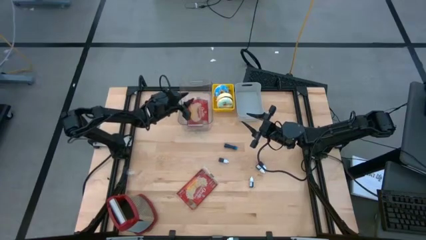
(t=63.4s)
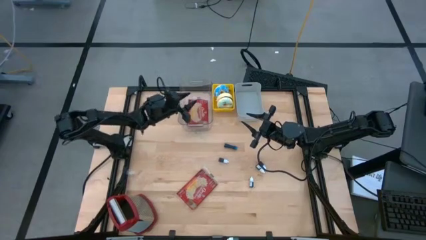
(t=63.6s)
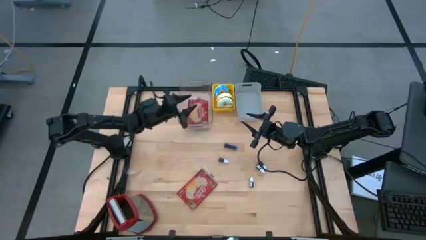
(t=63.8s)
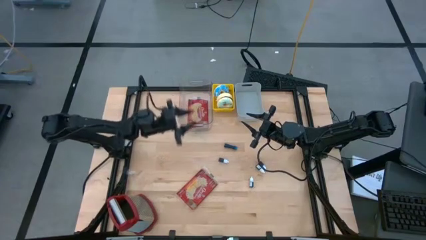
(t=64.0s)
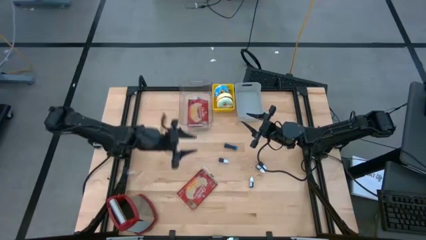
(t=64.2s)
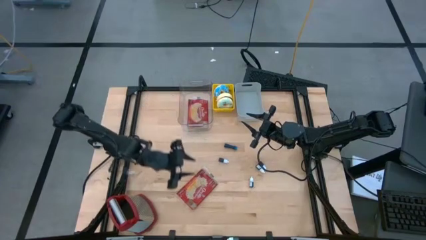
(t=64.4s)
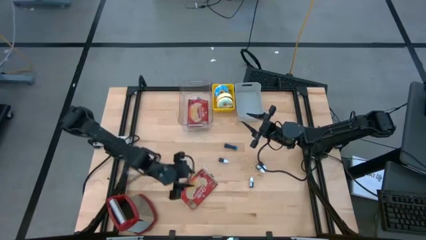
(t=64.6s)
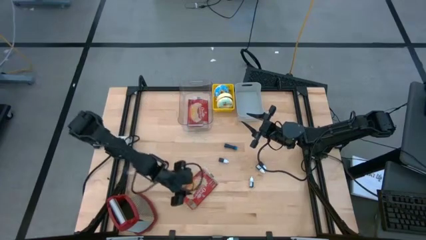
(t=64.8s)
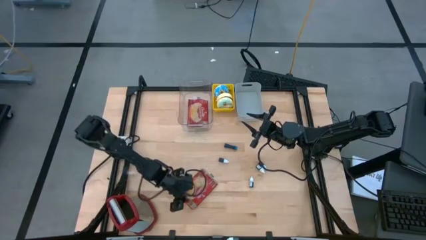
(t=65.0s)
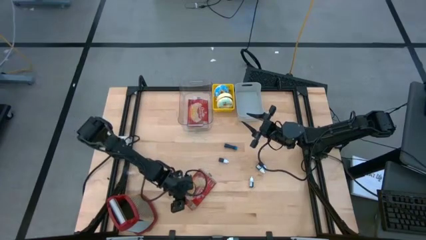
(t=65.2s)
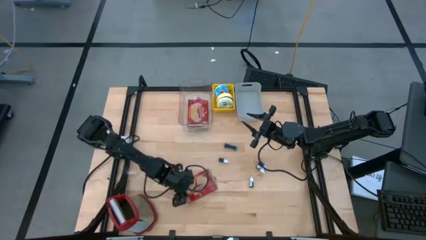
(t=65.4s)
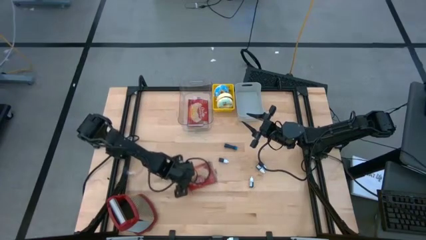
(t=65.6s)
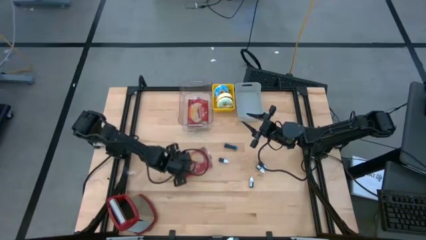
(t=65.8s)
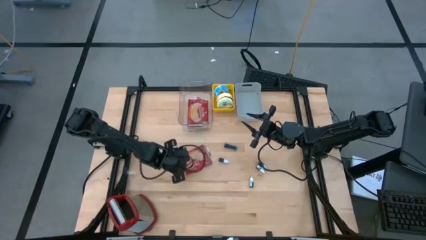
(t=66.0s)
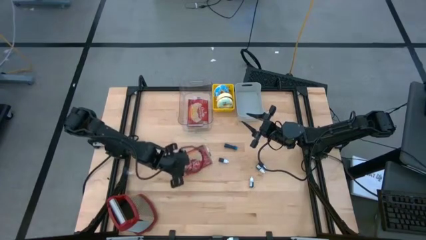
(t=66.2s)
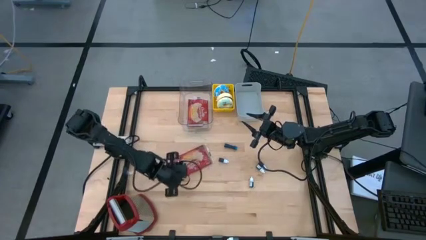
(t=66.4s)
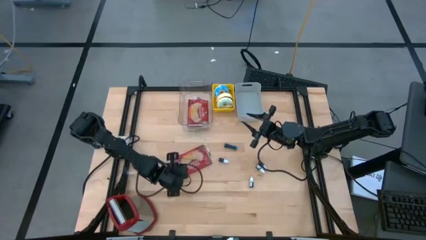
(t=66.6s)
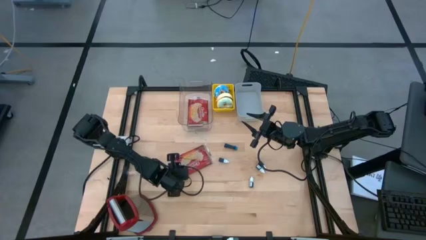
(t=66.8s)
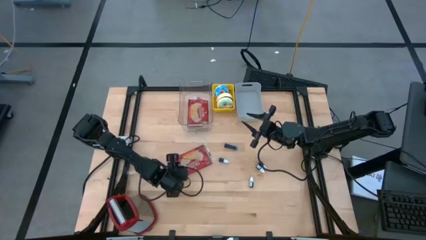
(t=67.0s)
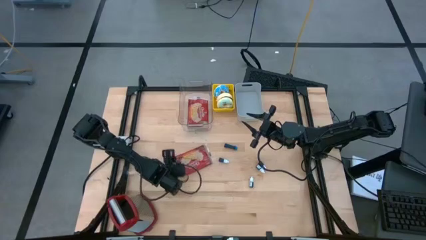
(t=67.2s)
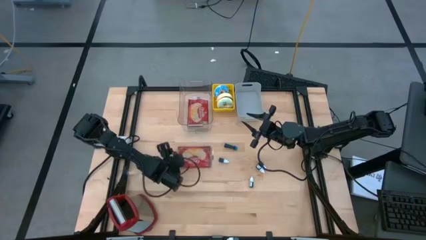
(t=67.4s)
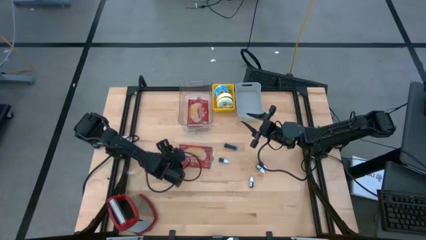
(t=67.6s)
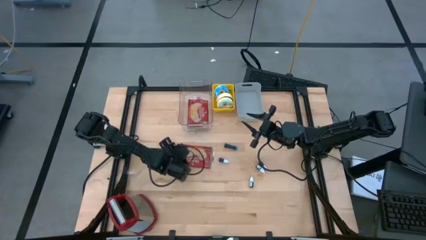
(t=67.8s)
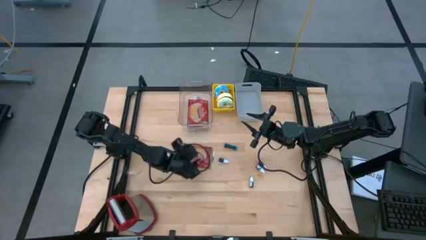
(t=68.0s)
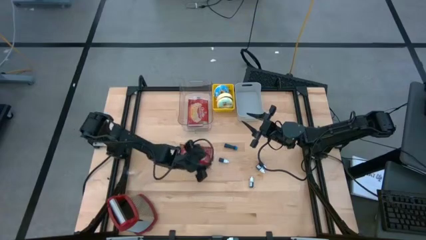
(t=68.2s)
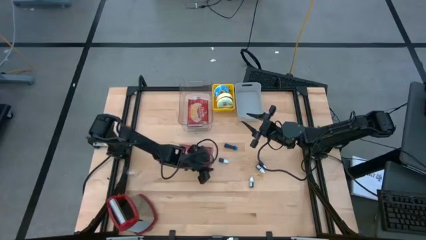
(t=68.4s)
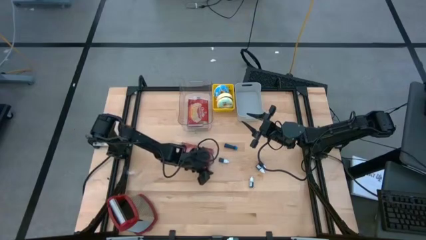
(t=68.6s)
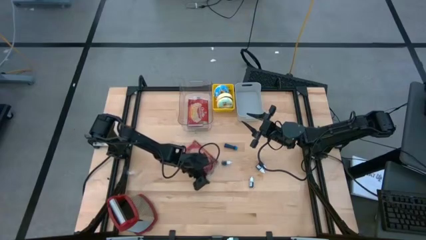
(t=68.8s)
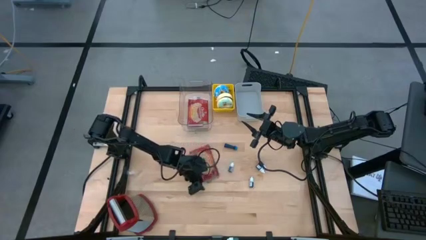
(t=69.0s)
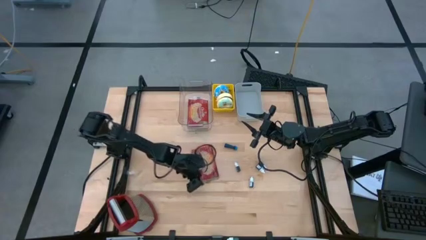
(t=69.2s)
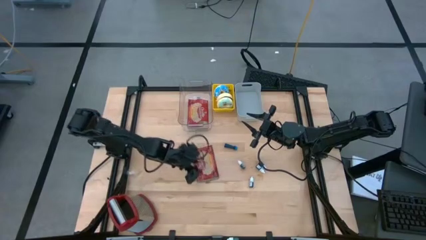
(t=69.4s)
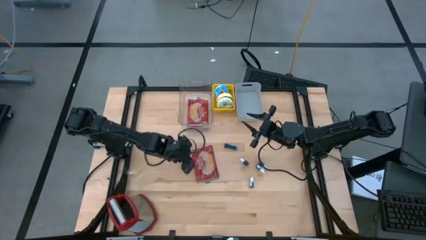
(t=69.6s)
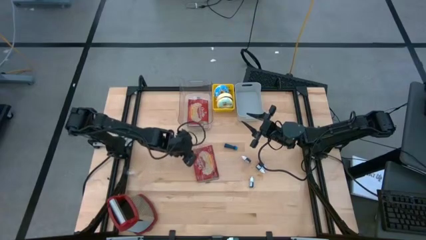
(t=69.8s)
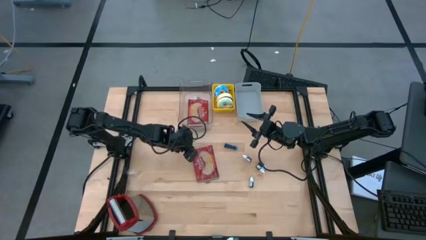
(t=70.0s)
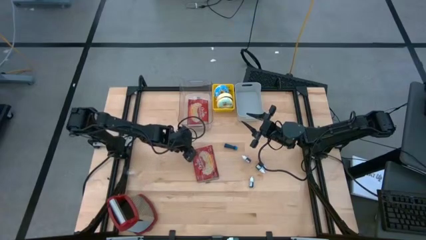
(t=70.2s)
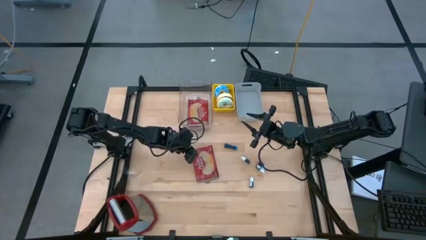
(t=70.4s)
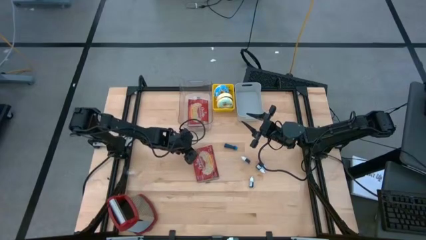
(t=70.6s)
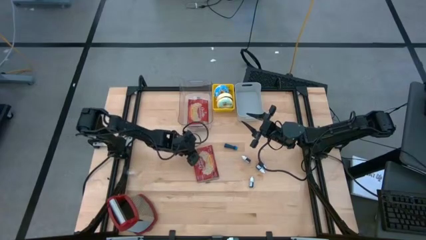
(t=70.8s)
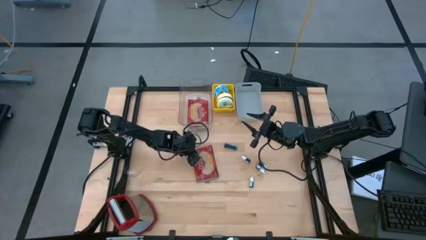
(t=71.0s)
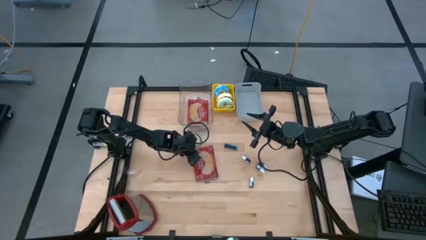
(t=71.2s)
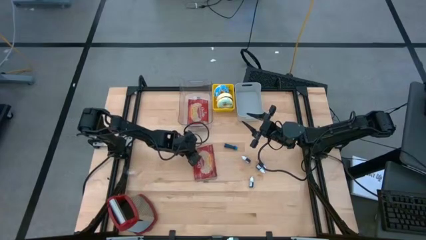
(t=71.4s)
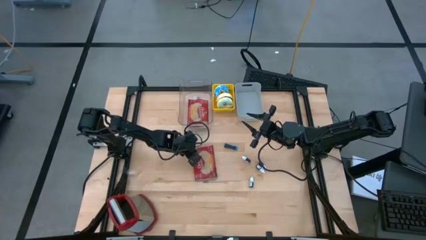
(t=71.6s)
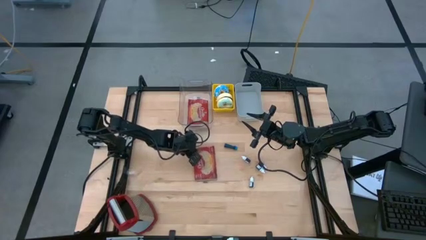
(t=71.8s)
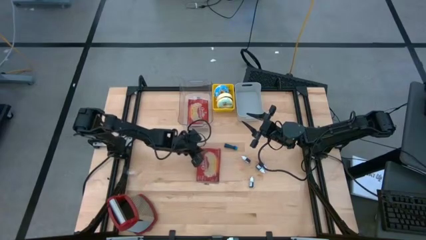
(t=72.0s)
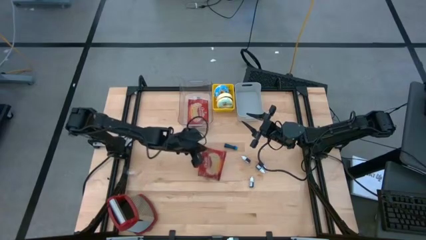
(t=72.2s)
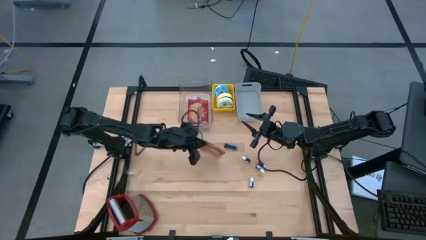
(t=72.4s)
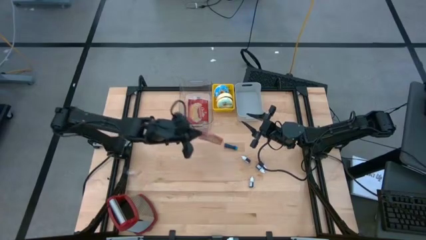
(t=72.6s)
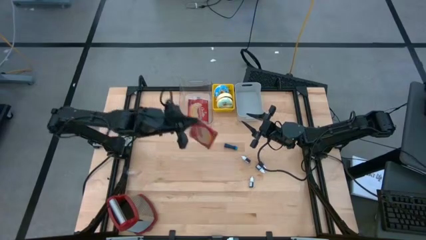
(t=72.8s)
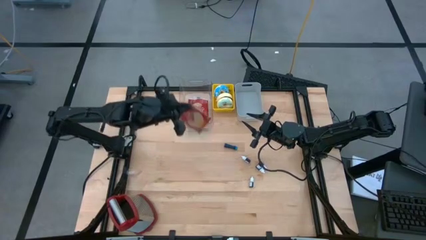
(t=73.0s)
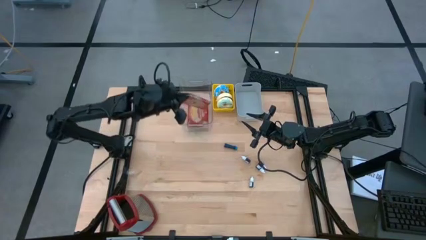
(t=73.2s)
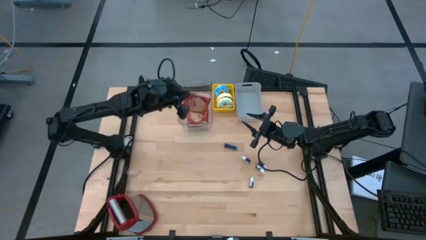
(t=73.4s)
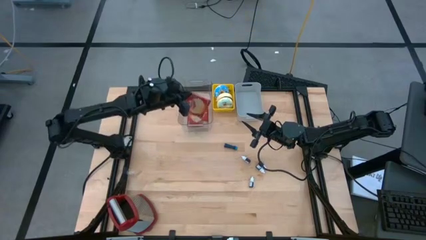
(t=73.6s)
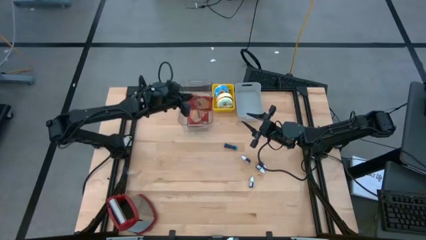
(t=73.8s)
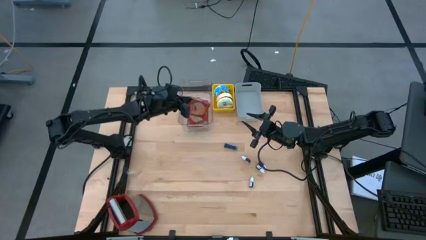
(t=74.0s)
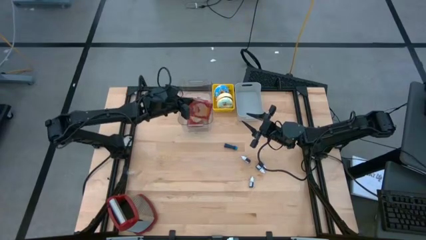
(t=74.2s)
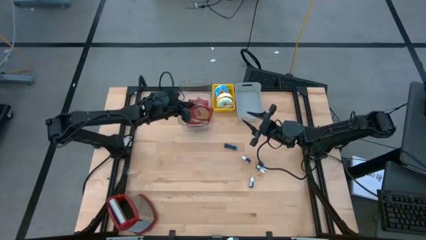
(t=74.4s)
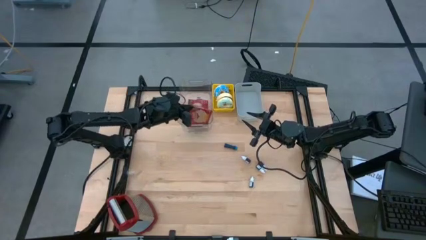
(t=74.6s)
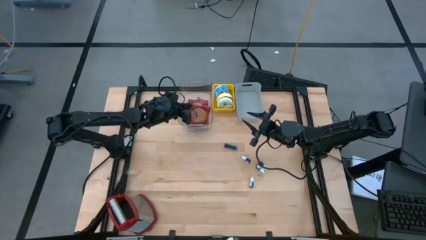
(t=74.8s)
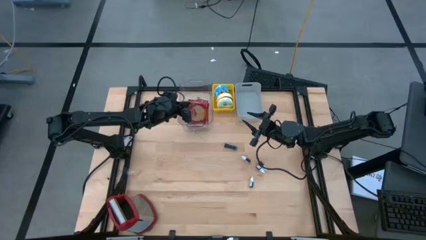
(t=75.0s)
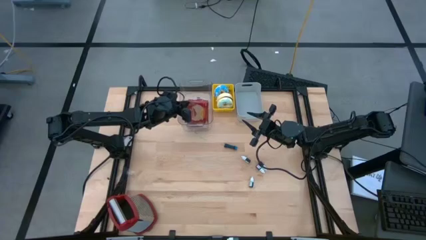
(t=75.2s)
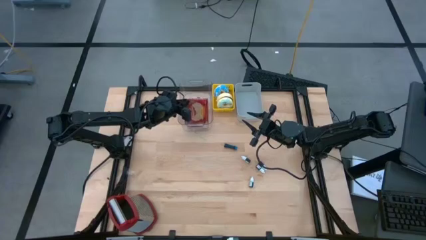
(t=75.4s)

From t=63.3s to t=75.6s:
Stack the red popcorn bag on top of the other red popcorn bags in the clear bin

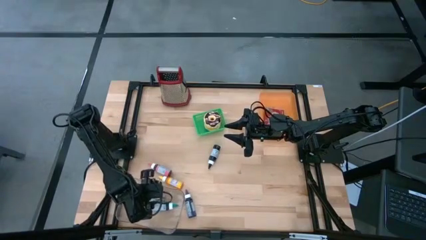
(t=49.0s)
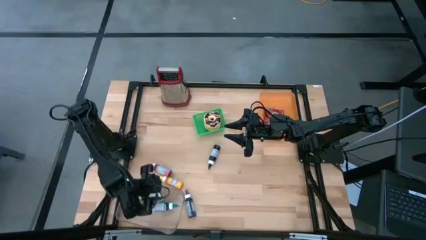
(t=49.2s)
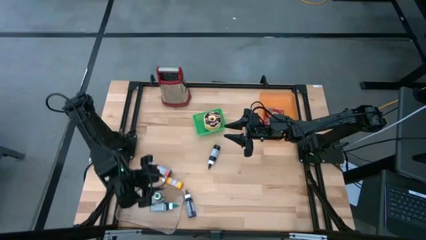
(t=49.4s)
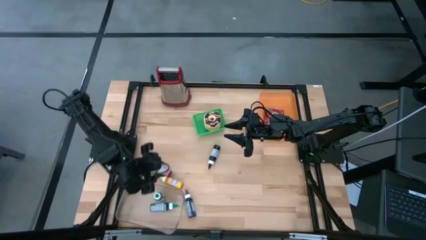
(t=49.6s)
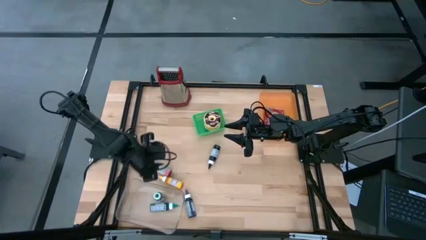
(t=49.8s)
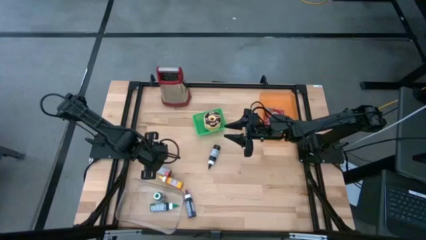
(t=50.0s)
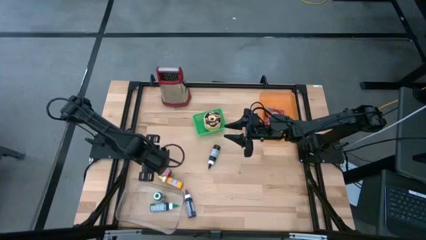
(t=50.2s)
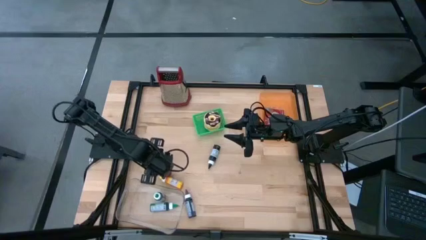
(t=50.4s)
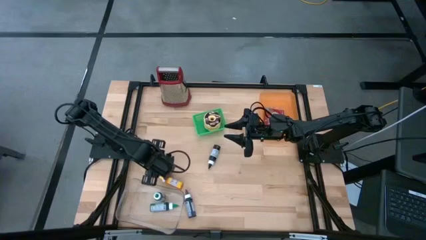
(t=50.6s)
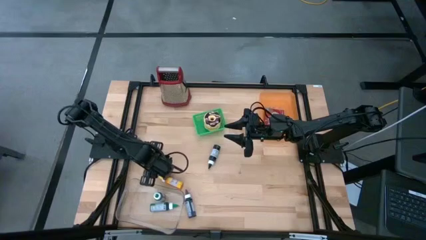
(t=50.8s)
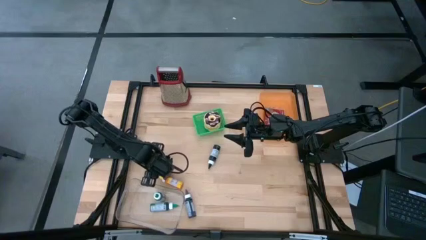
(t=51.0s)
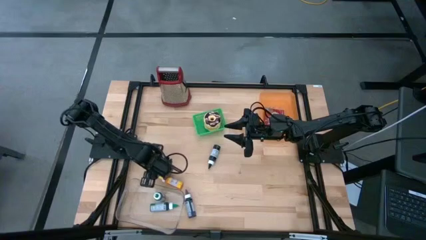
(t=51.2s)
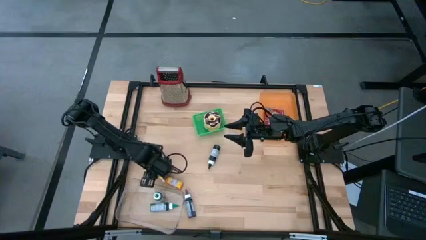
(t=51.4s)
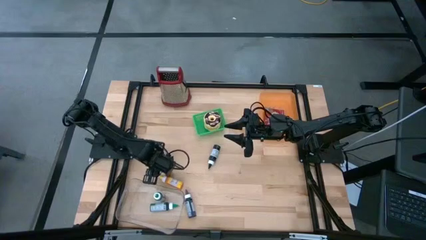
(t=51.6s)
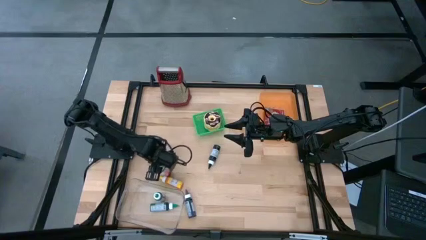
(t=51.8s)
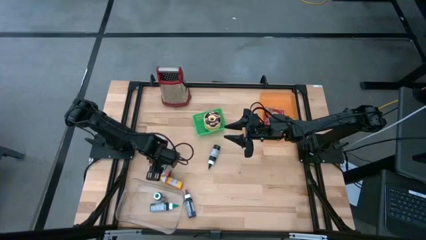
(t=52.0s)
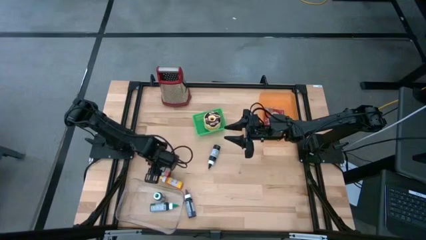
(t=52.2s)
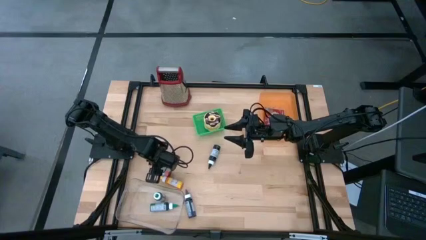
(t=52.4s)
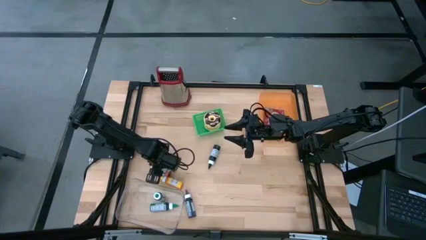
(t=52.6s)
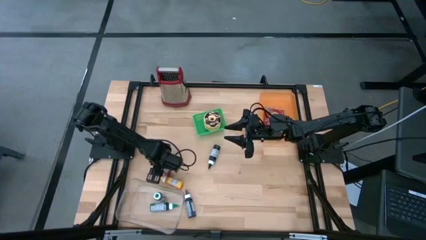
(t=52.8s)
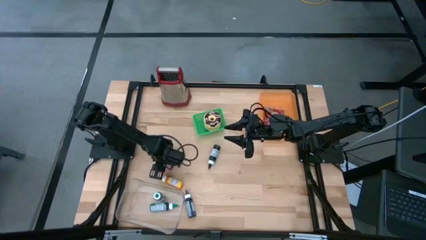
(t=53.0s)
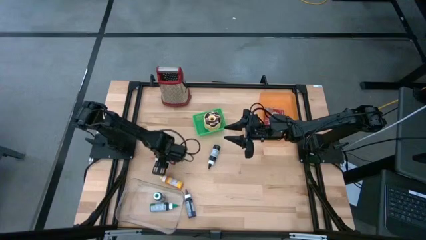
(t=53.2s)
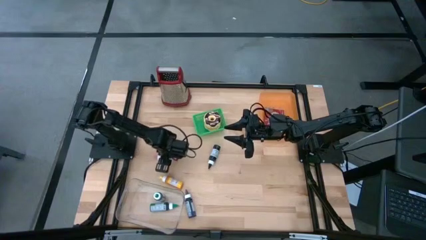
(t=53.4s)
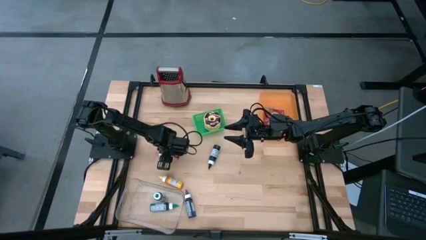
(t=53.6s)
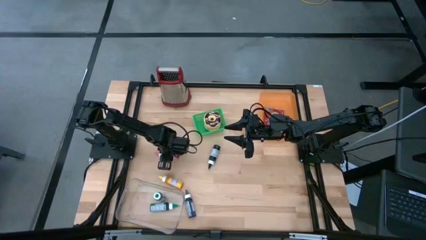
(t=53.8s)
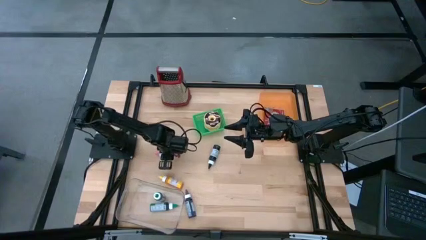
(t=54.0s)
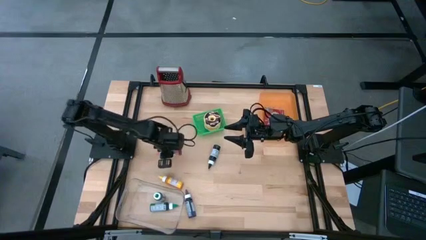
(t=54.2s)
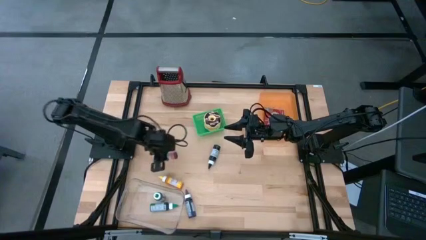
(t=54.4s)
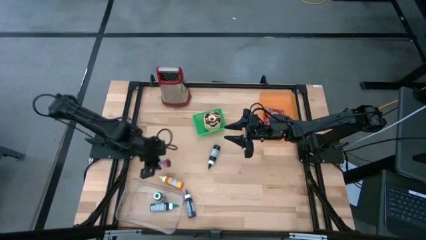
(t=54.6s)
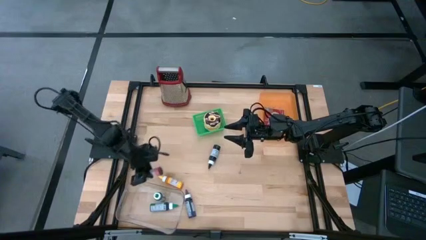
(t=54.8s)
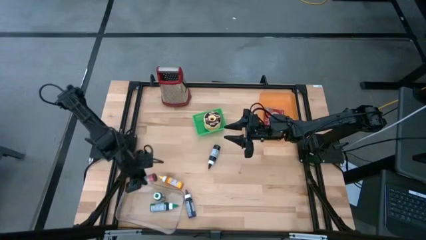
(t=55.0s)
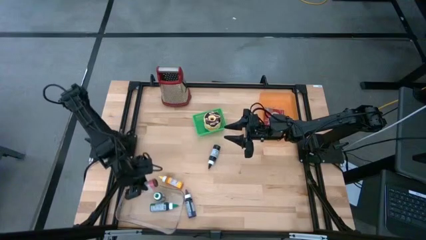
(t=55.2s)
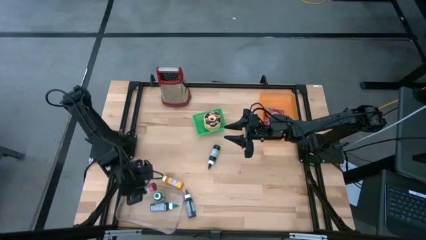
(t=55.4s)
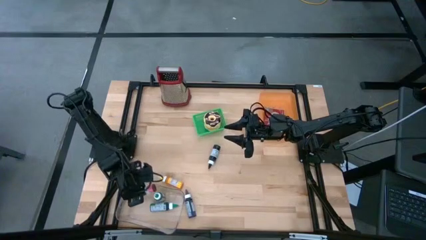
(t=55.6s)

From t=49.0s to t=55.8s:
Put the pink food coloring bottle into the transparent bin
